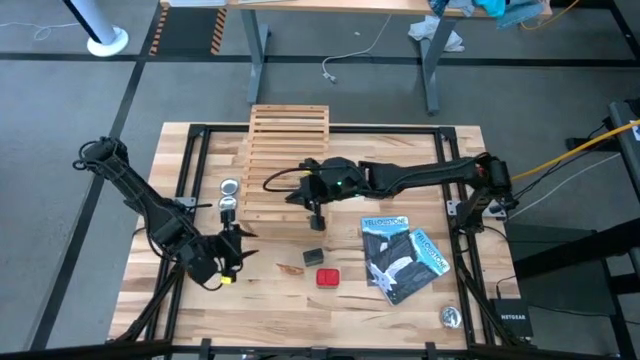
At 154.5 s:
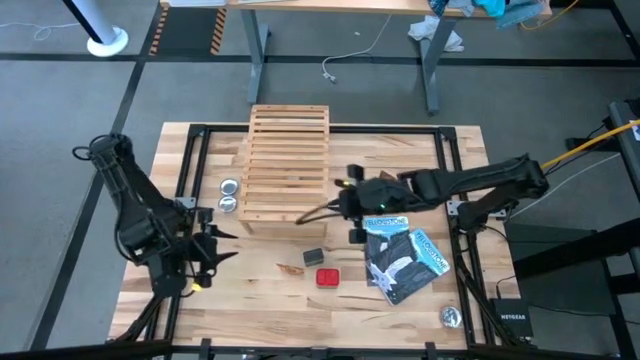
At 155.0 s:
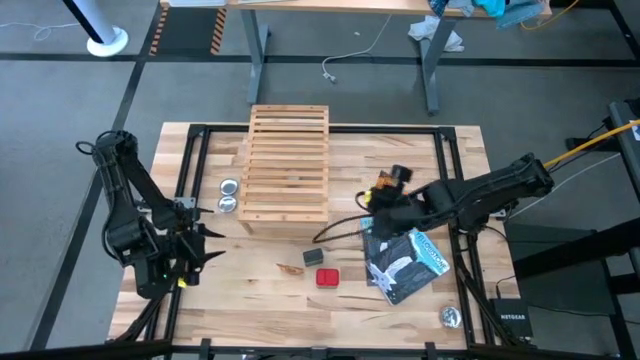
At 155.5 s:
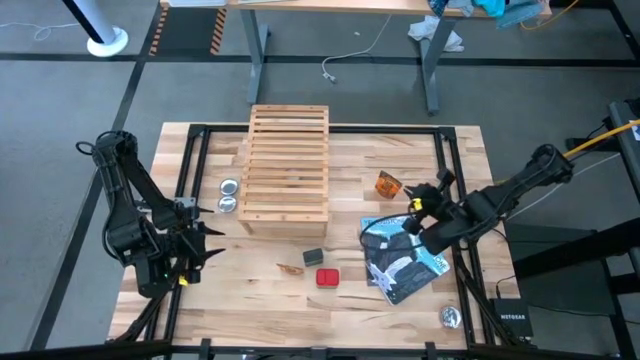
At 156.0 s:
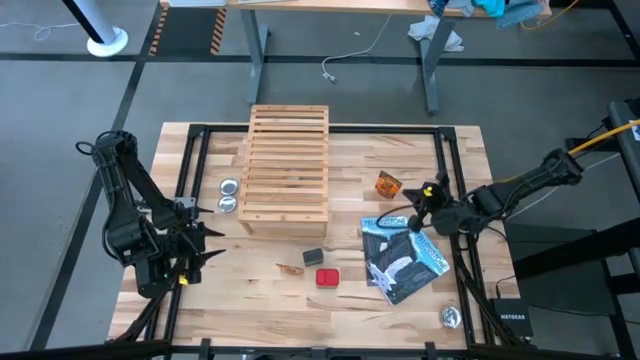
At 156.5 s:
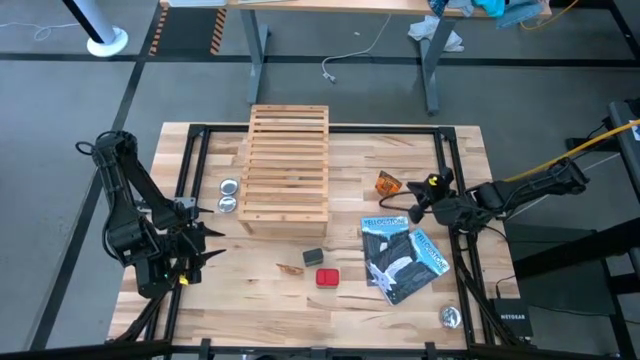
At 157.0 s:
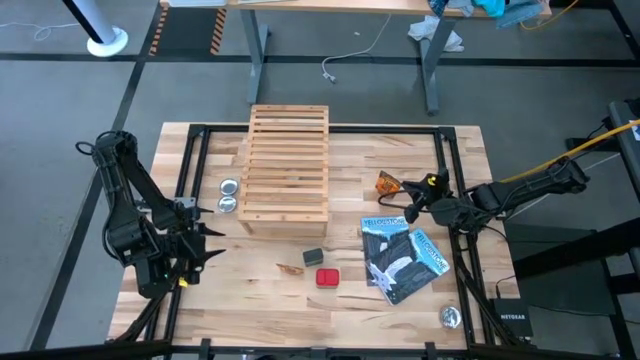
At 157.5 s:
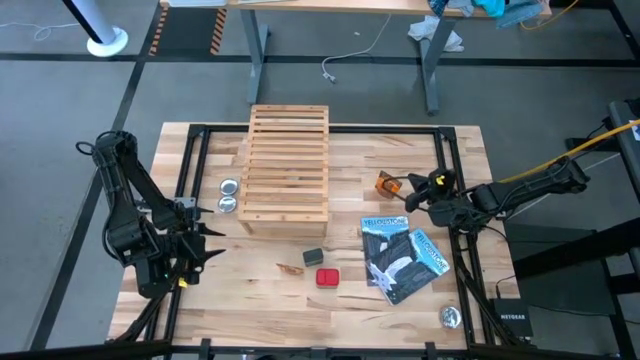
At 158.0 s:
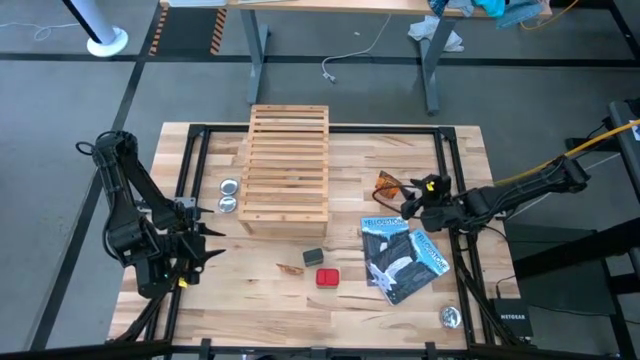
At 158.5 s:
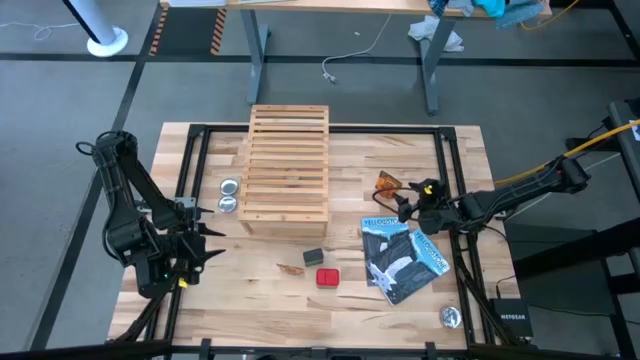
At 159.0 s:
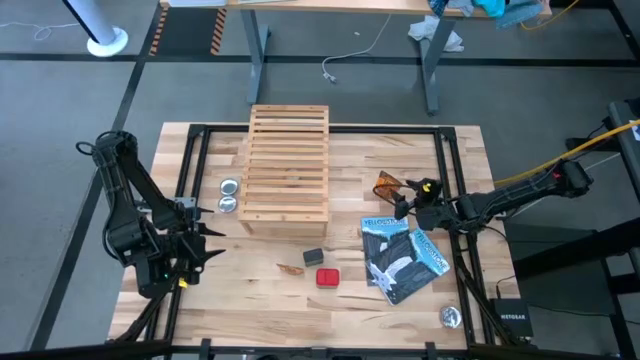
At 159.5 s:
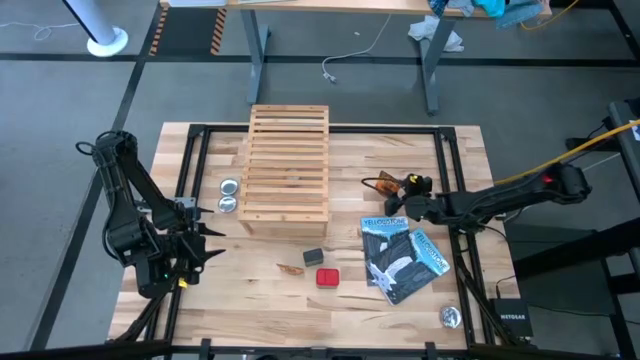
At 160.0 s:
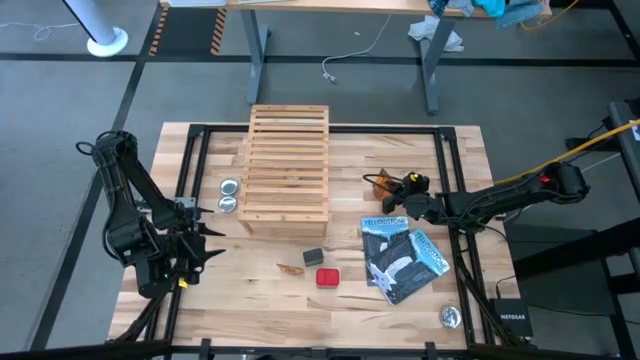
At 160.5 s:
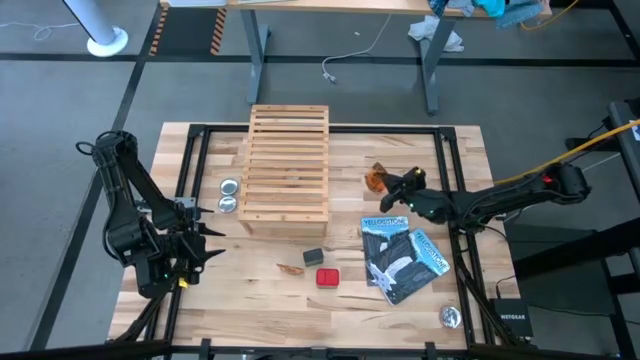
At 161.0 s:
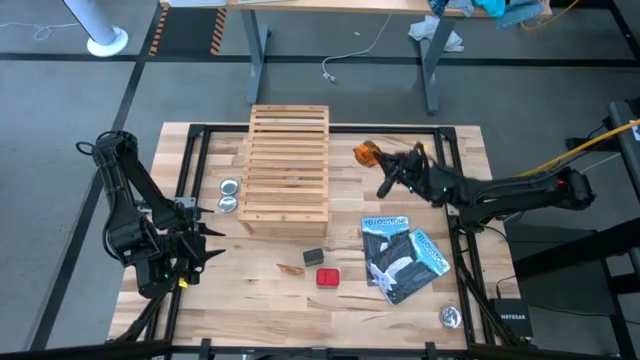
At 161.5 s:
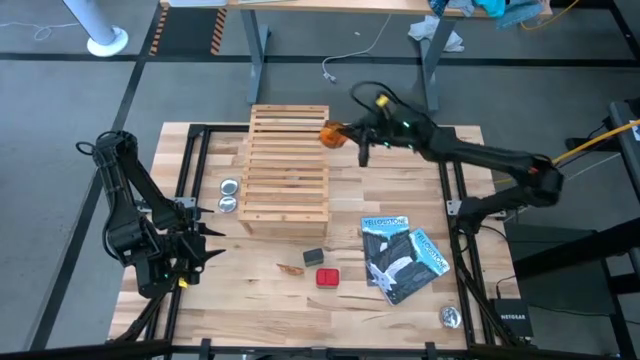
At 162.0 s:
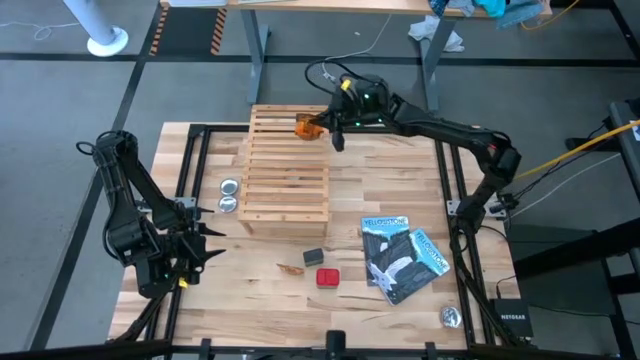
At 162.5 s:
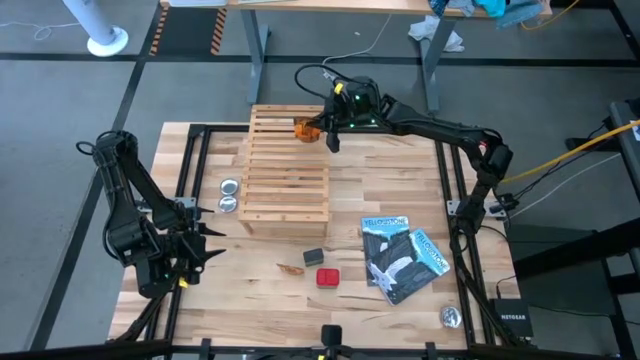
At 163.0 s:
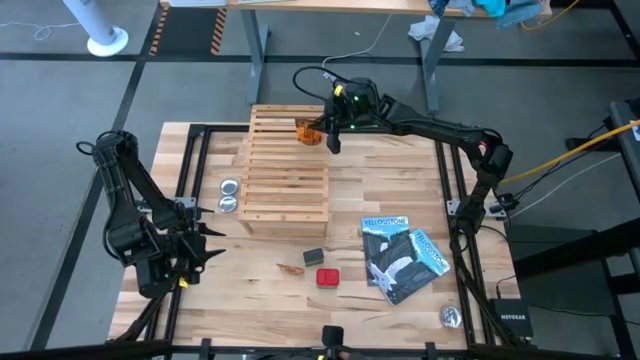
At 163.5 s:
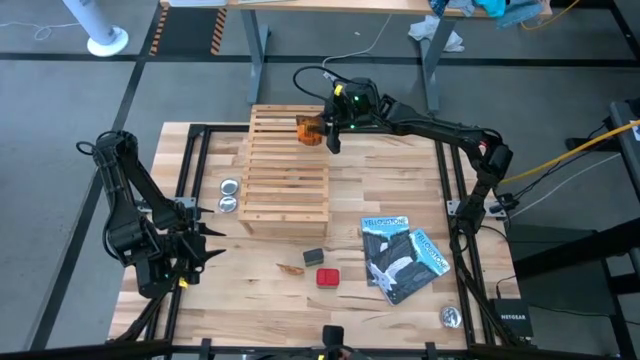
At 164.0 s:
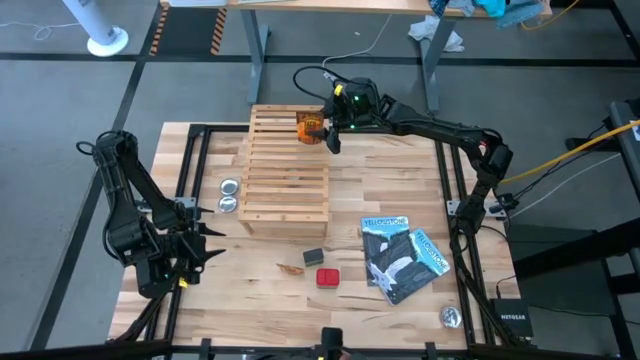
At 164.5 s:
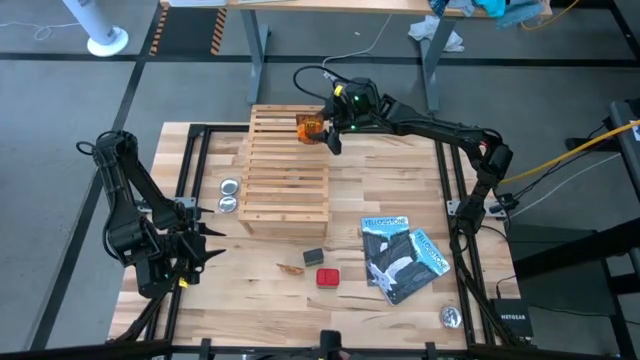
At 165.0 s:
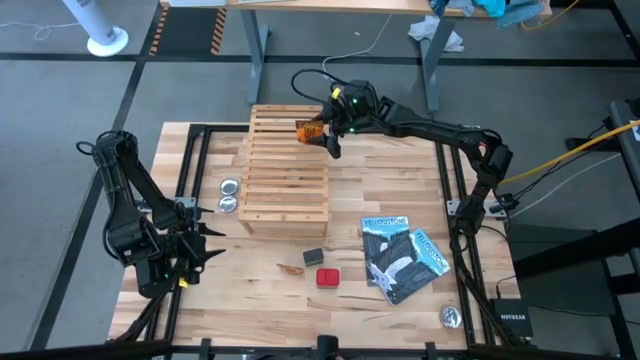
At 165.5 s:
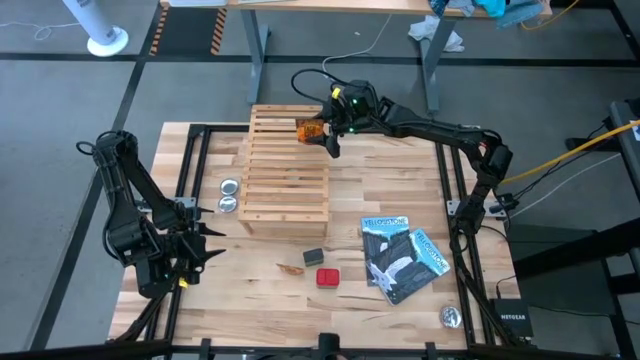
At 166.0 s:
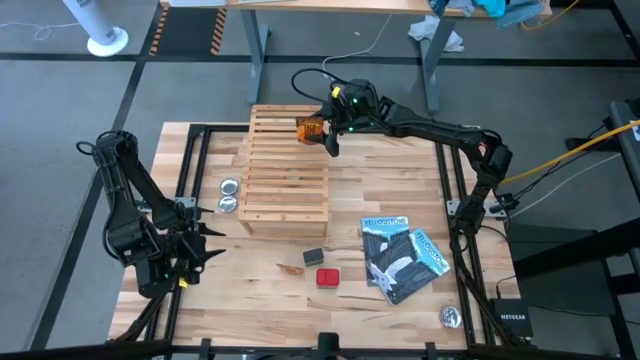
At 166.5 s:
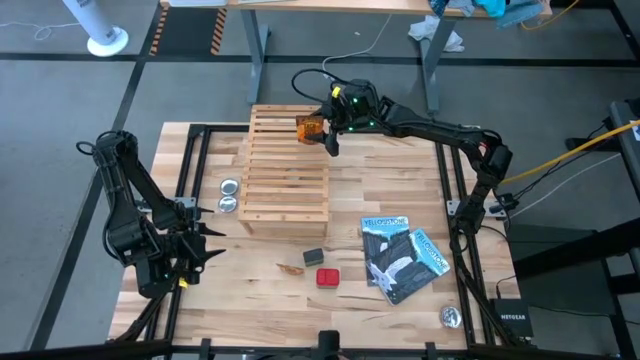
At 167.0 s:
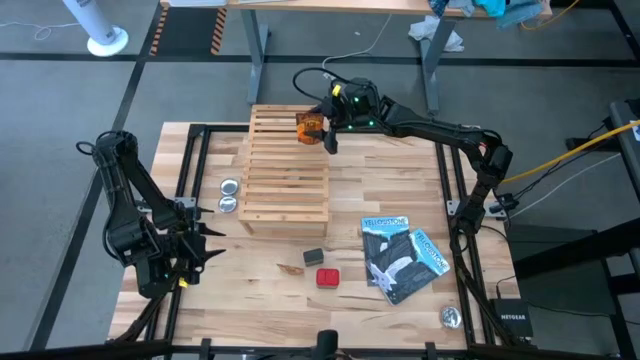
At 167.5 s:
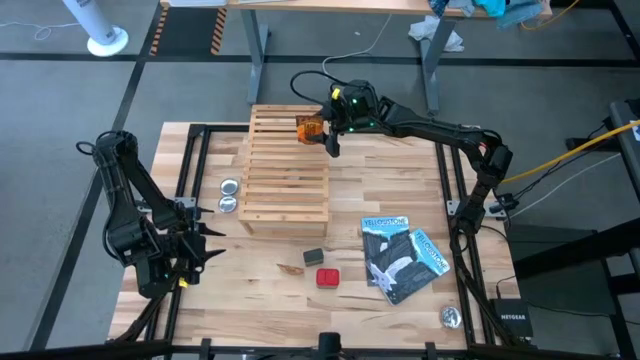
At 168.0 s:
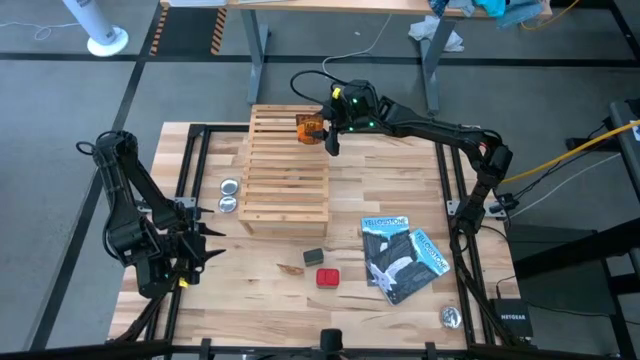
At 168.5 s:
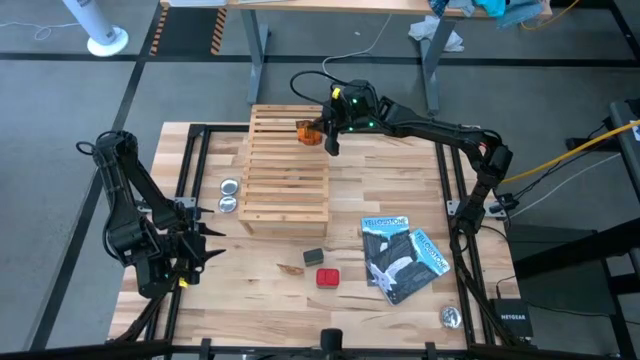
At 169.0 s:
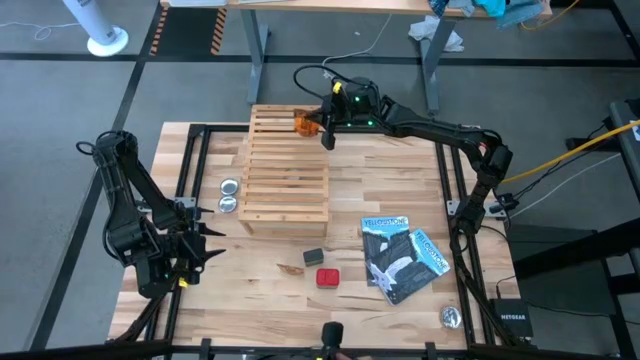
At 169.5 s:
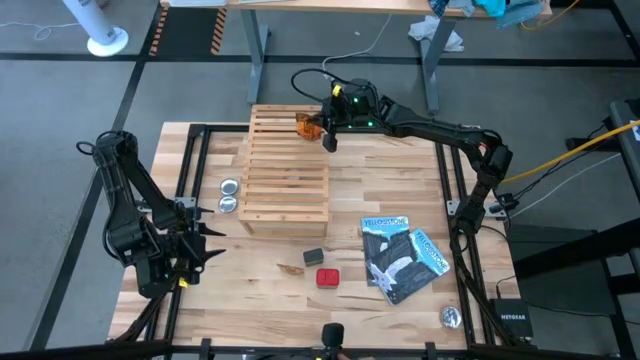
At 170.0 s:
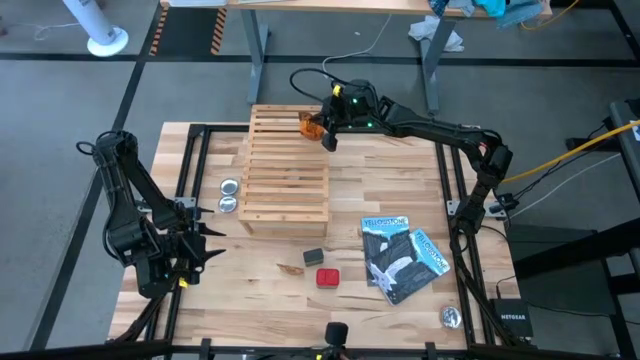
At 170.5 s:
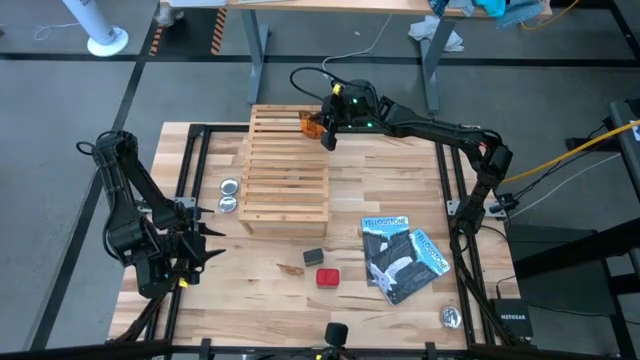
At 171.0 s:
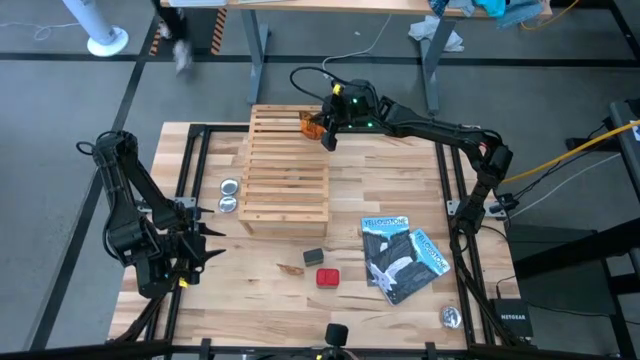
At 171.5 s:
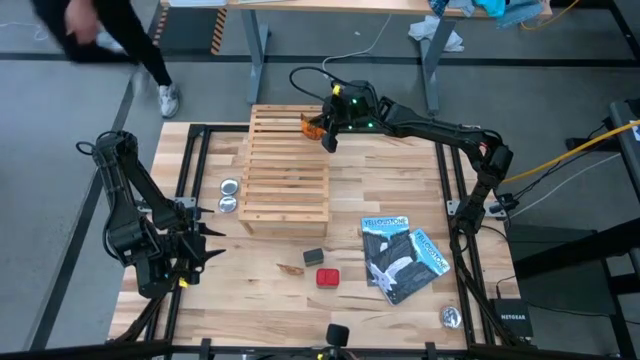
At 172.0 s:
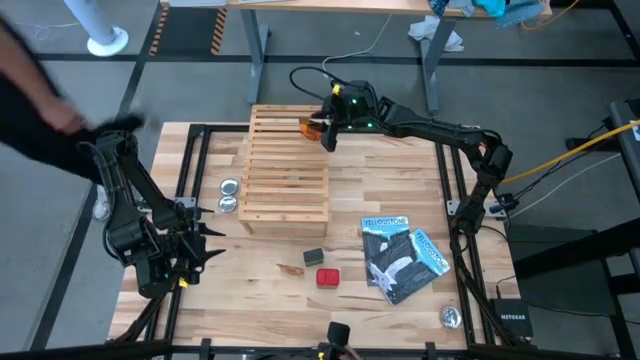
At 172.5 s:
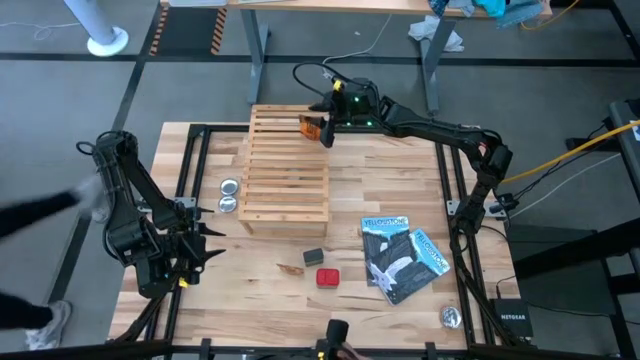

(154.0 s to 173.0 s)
Task: Shelf spices
Put the orange seasoning pack on the shelf

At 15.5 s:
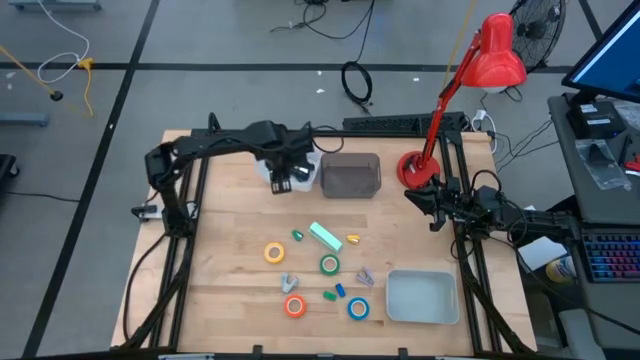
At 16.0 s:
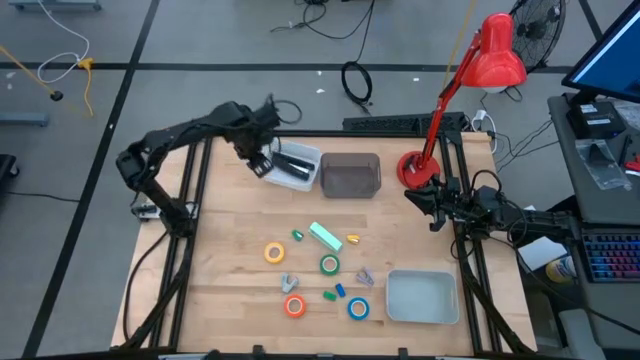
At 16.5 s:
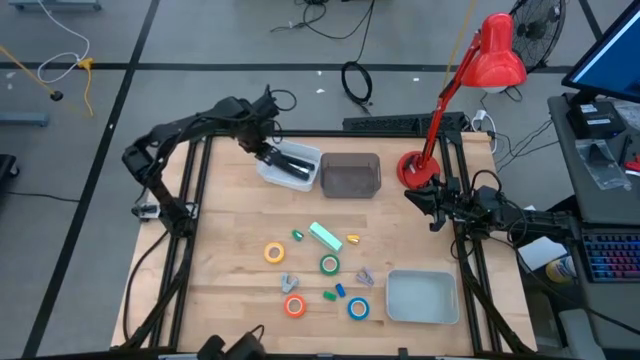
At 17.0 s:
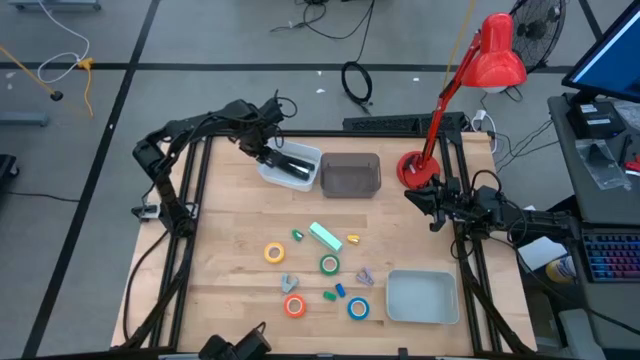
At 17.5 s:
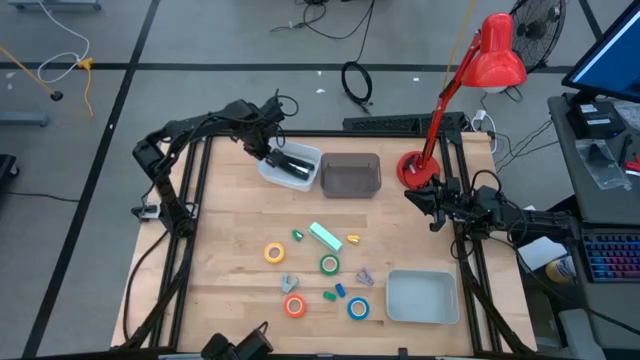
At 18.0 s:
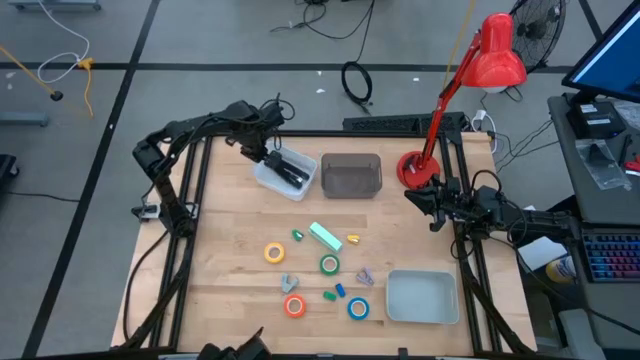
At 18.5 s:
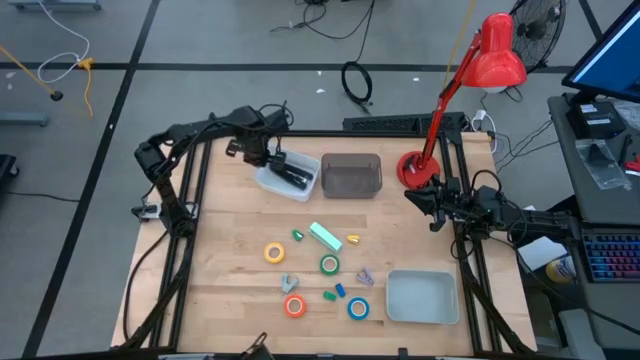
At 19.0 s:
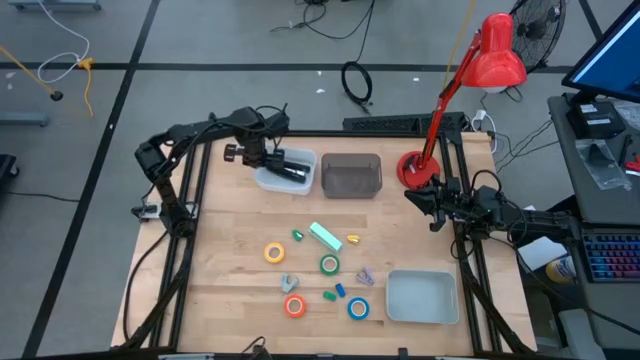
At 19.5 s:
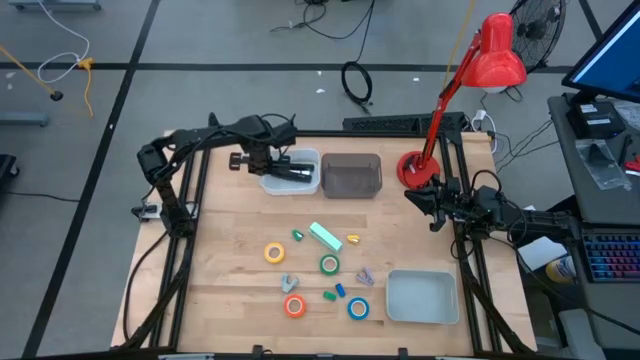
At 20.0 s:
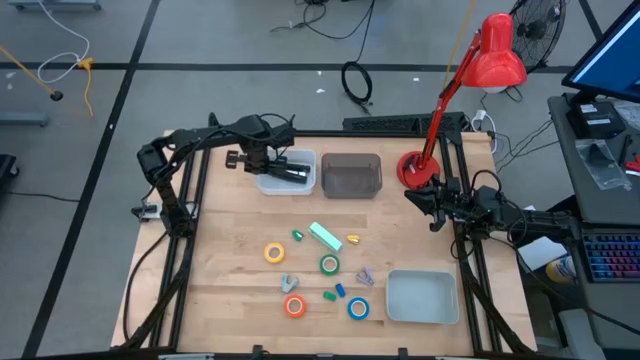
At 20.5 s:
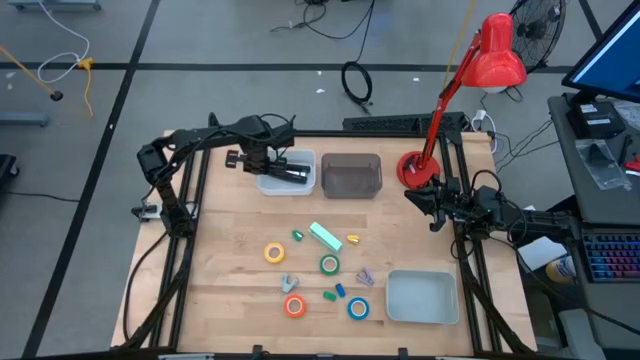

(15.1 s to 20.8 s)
Task: Pick and place Stapler, Stapler remover, tape
Adjust the white bin
